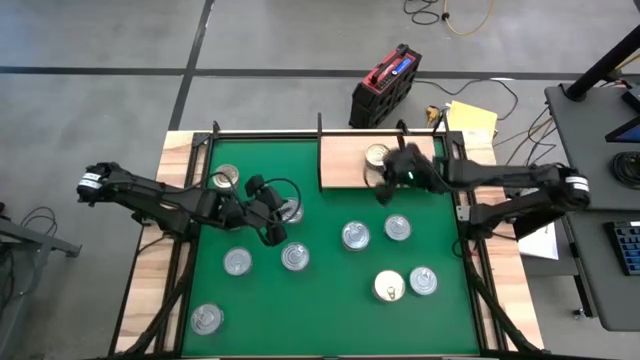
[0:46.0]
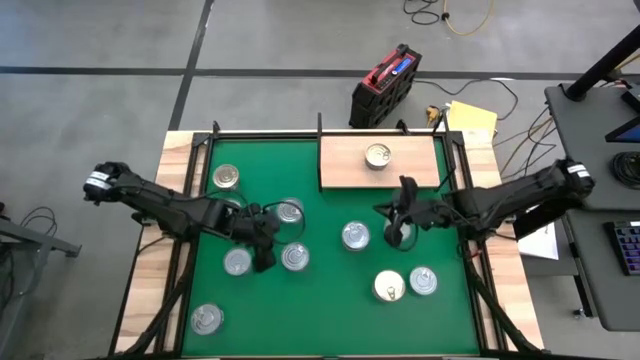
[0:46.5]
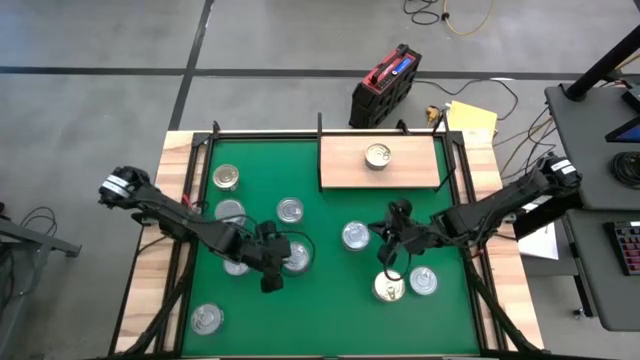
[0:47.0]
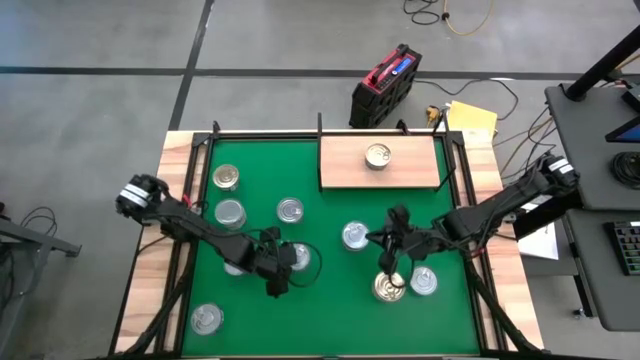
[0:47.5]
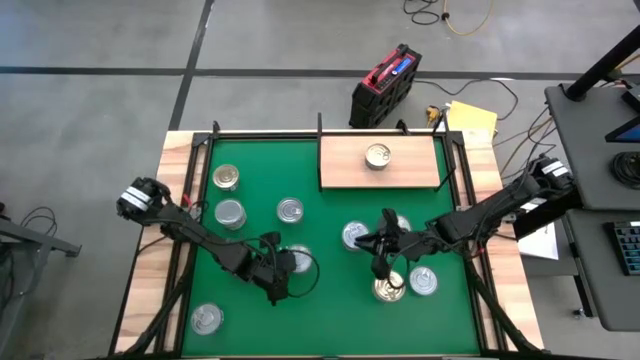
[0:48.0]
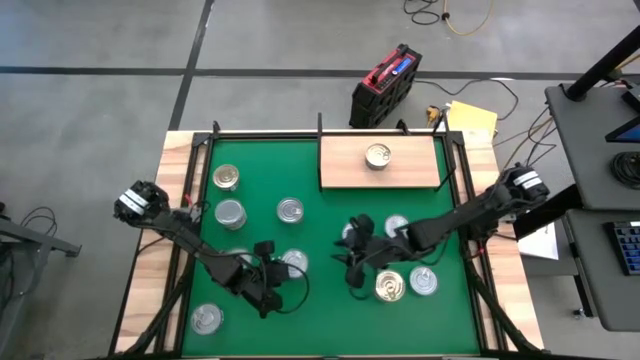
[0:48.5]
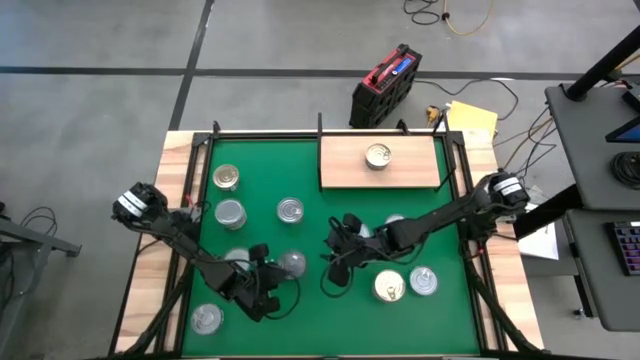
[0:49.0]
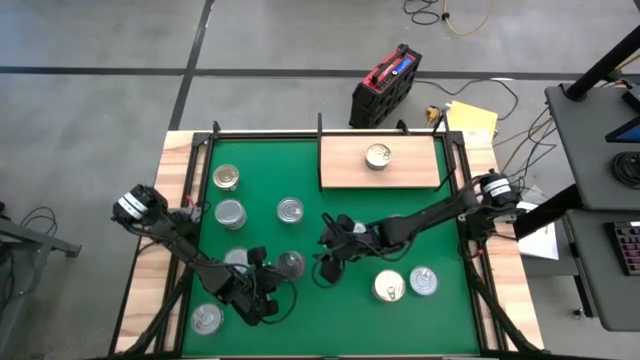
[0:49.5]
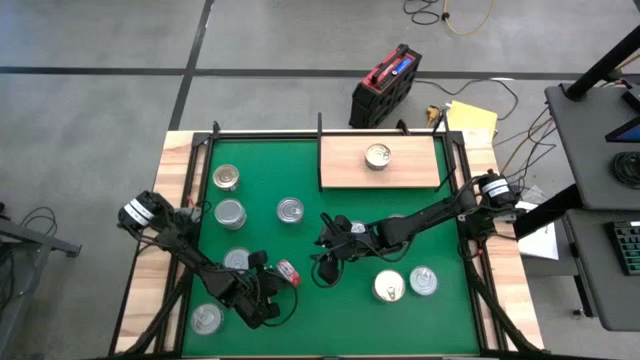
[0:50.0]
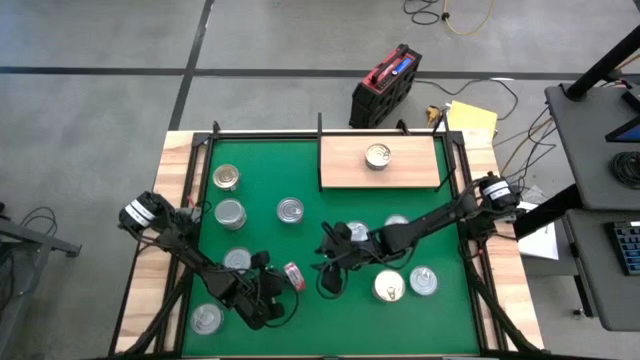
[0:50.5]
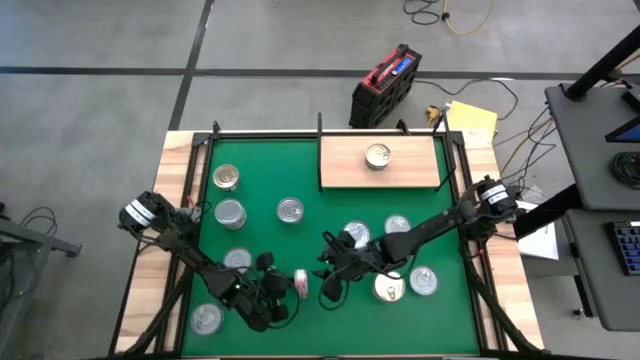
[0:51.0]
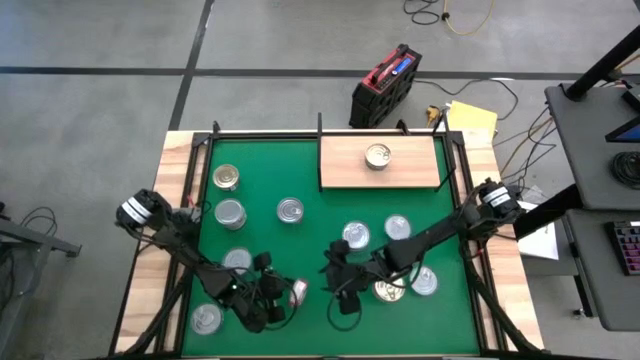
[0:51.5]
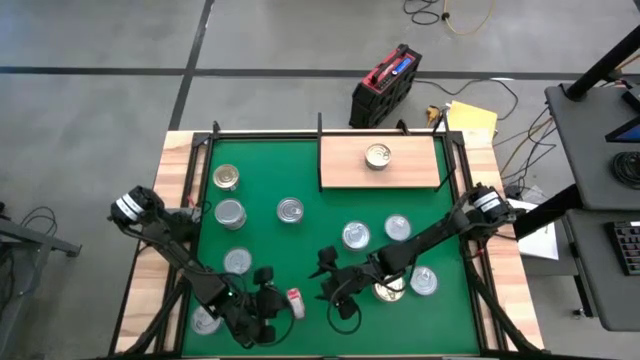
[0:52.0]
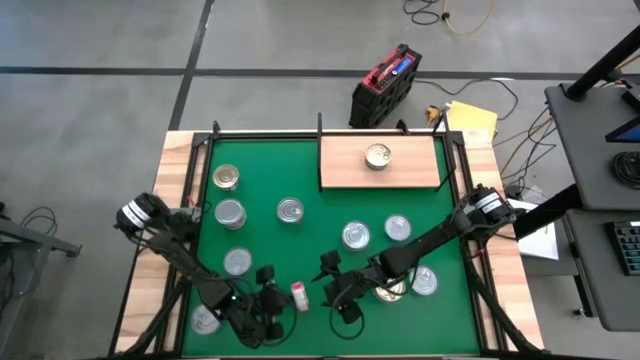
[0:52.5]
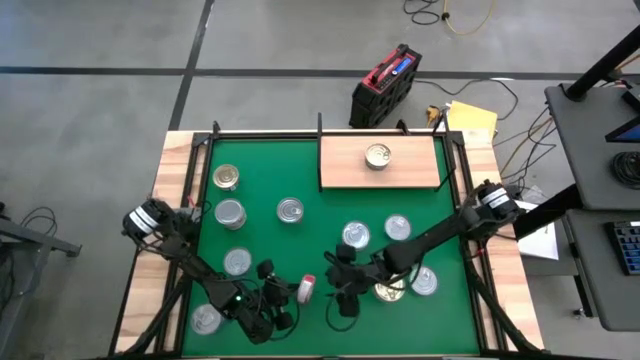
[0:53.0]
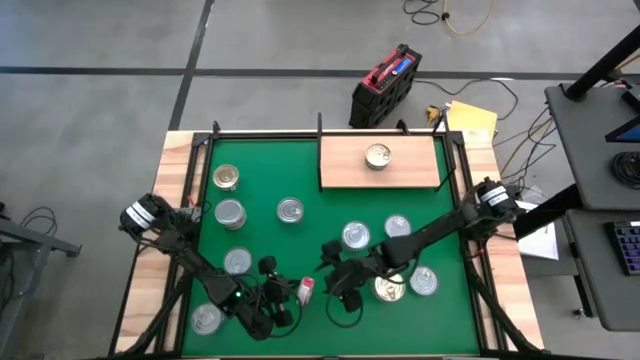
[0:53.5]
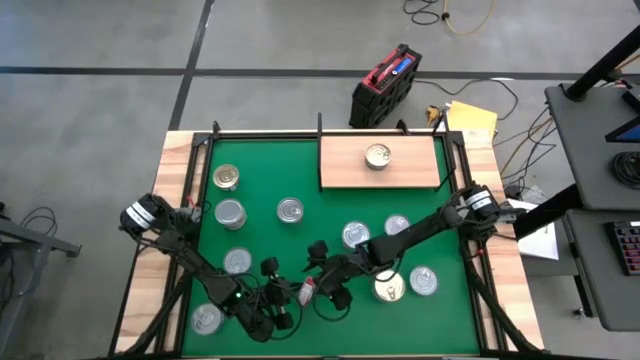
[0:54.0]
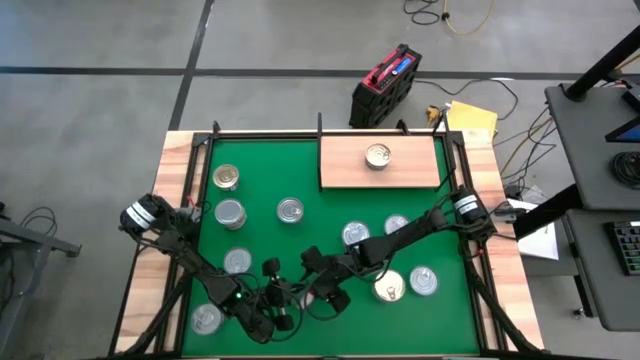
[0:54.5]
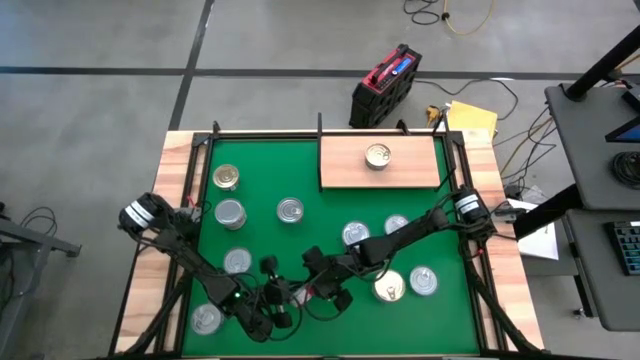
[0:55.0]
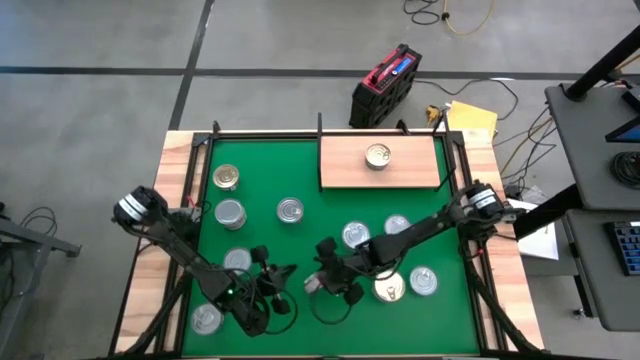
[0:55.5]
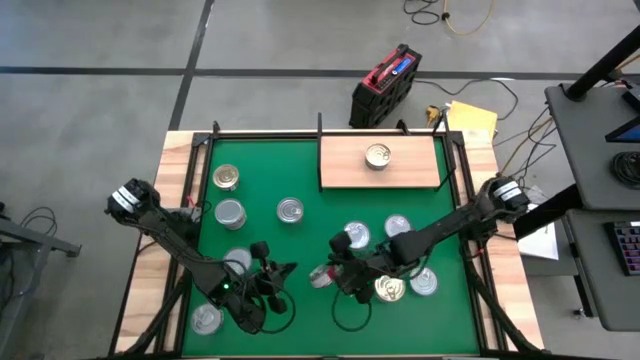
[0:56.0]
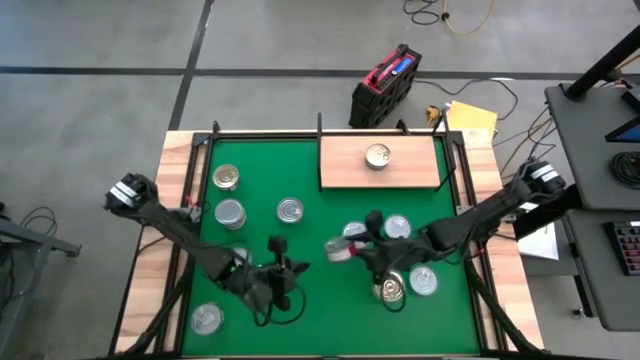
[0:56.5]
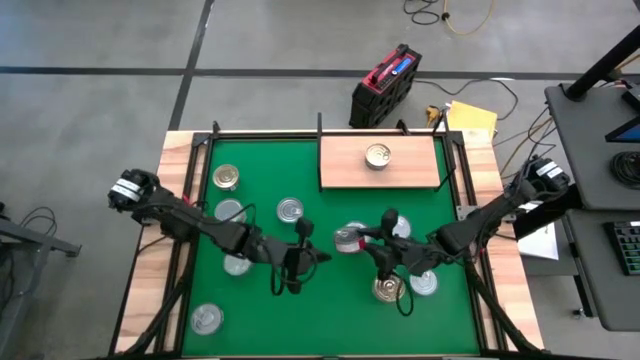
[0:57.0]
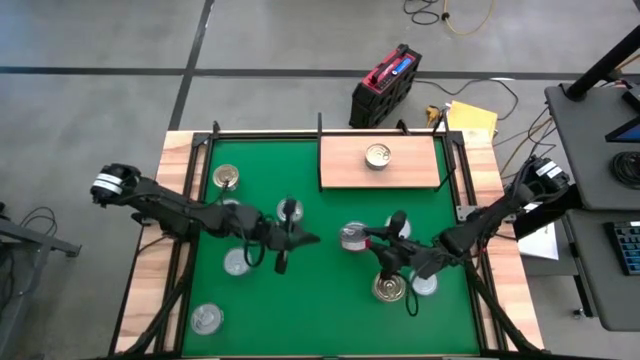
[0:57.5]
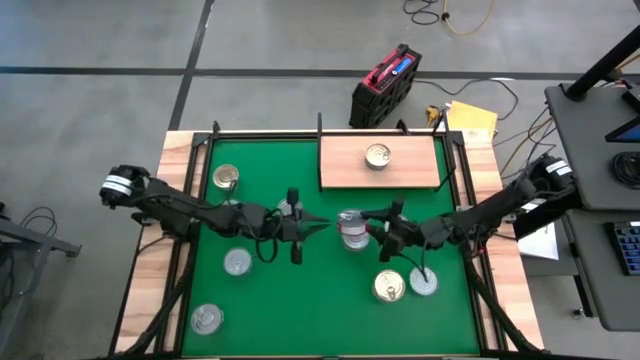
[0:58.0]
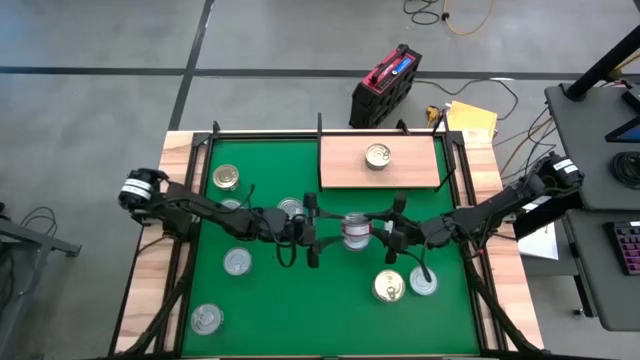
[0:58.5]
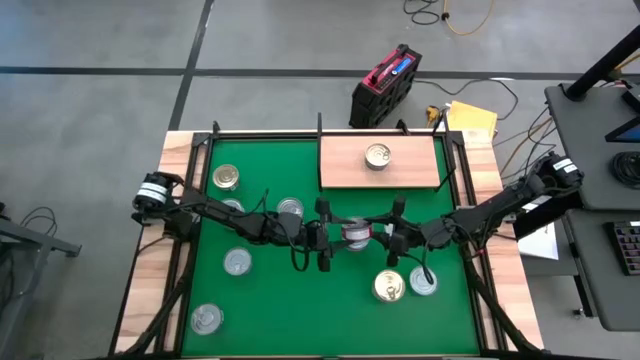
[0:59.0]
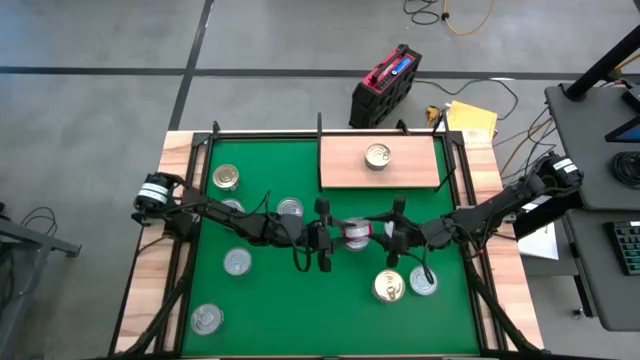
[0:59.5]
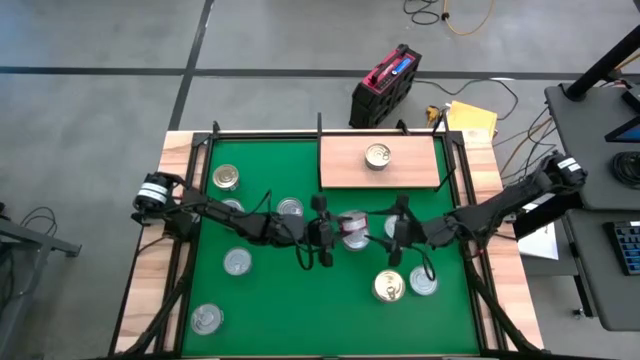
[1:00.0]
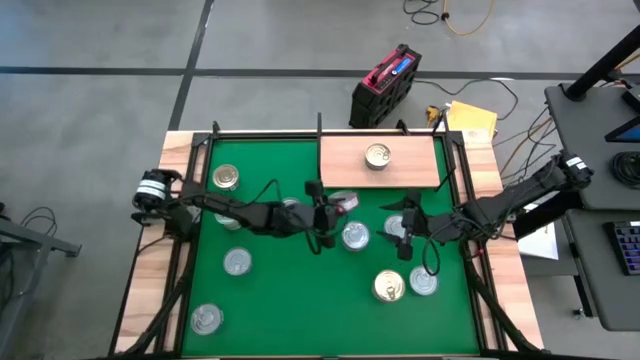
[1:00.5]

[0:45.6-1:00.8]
Task: Stack canned seafood by type on shelf
Put the red tuna can on the shelf

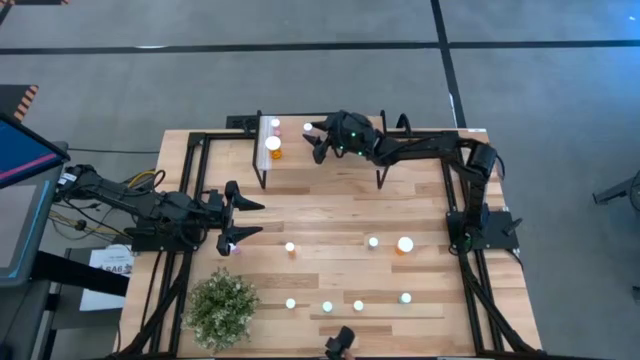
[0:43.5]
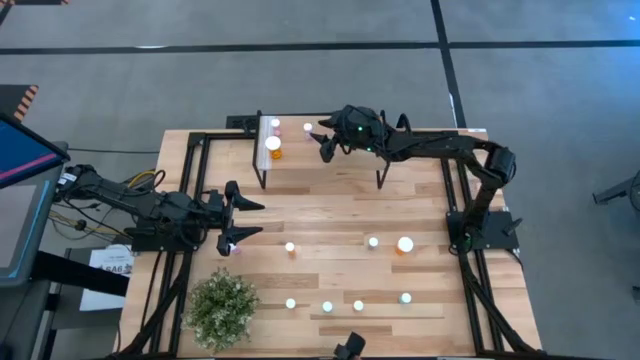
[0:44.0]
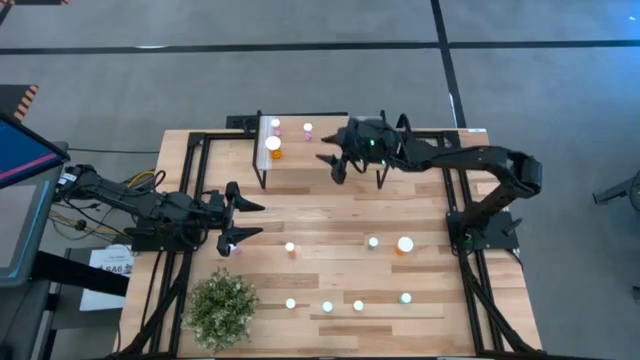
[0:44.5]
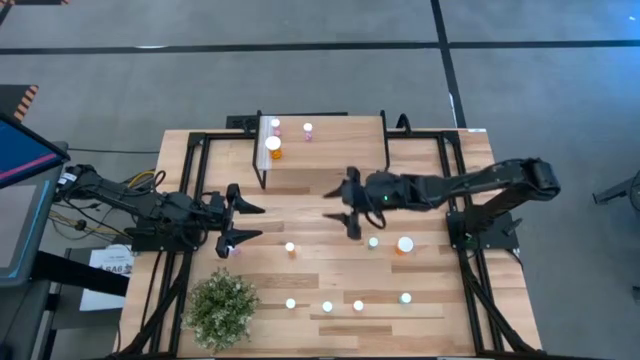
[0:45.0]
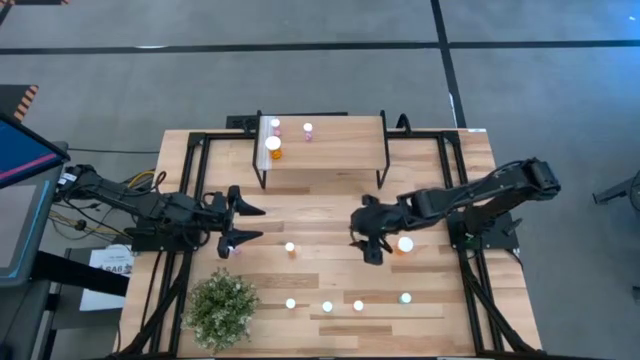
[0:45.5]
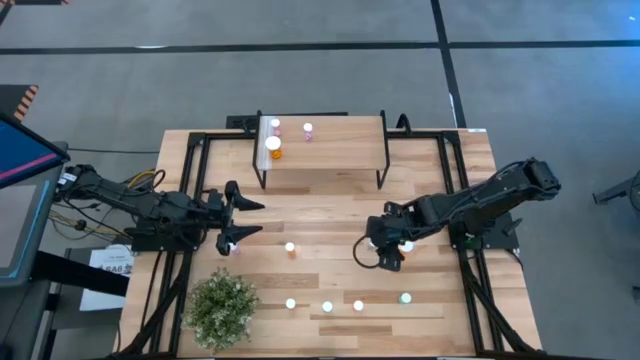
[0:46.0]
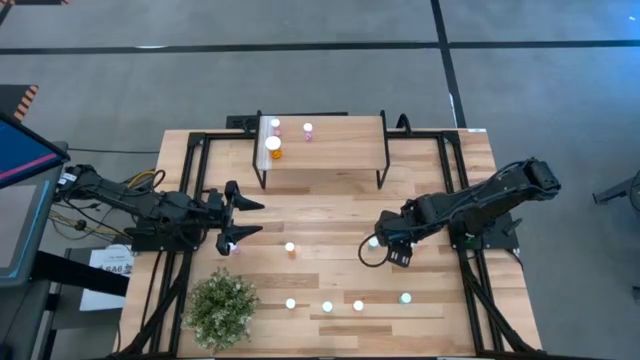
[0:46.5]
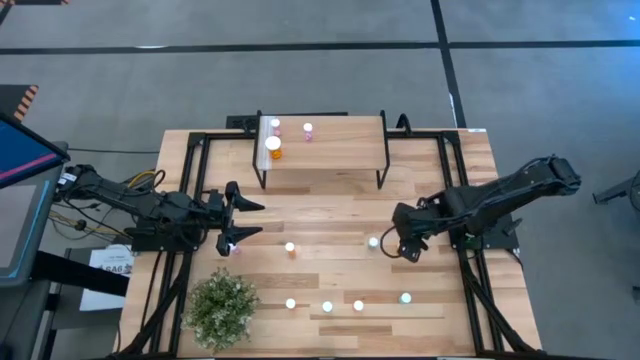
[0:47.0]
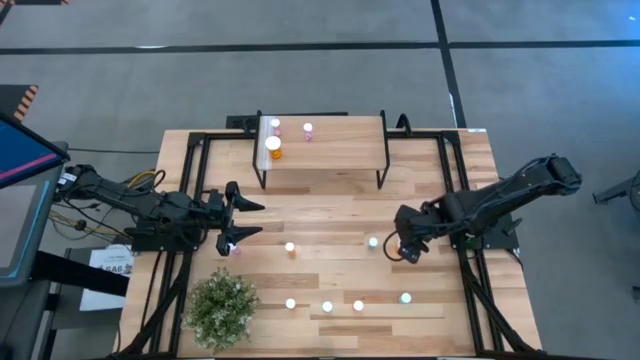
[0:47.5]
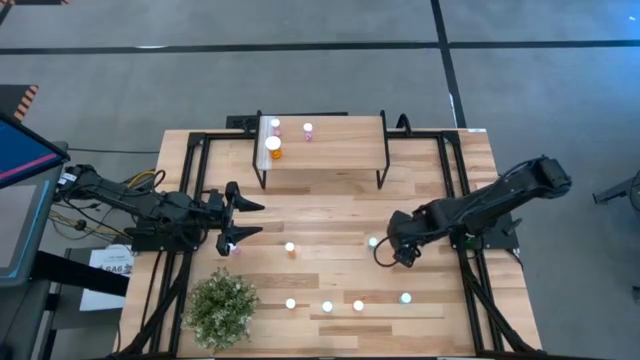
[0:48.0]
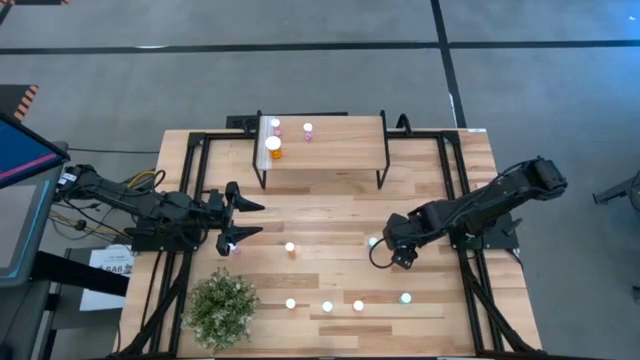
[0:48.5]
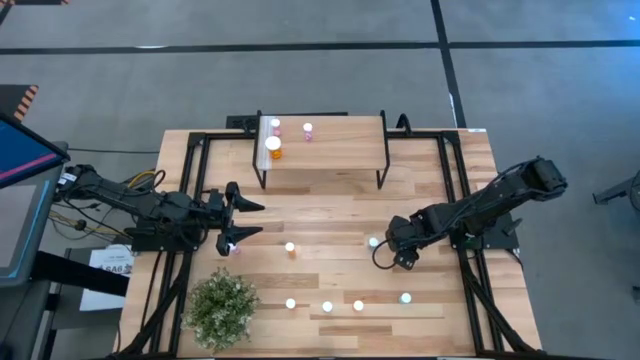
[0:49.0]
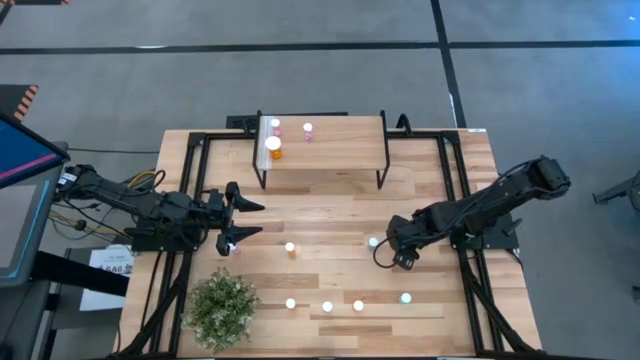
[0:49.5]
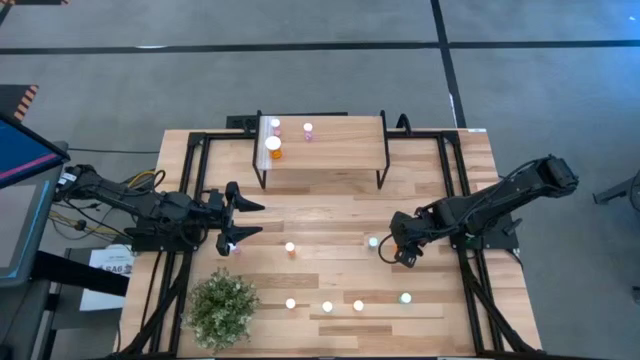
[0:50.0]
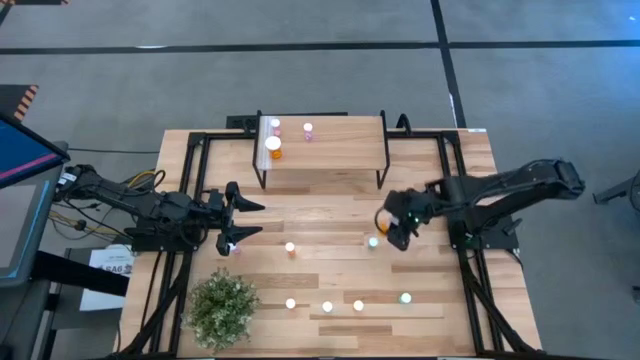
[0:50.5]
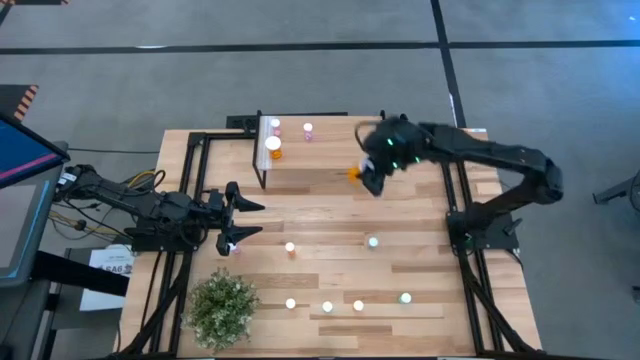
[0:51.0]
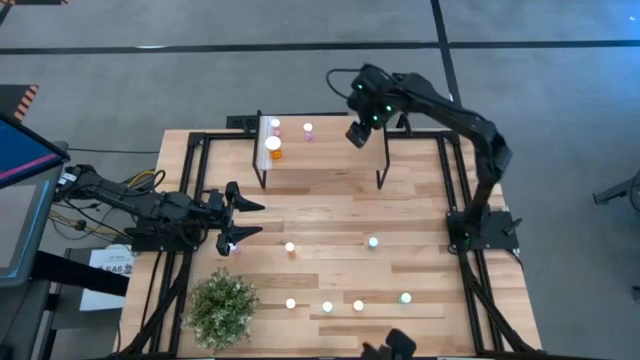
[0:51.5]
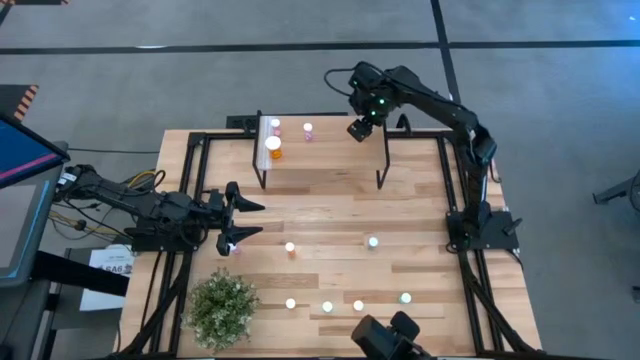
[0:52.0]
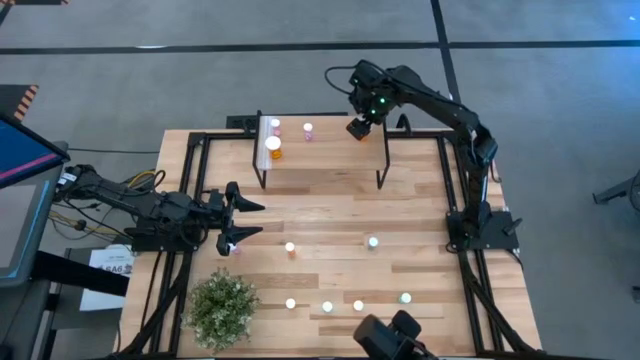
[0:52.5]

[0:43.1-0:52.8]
Task: Pick and place medicine bottles onto shelf by color
Put the large orange pill bottle on the shelf
